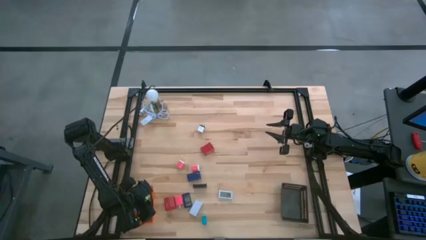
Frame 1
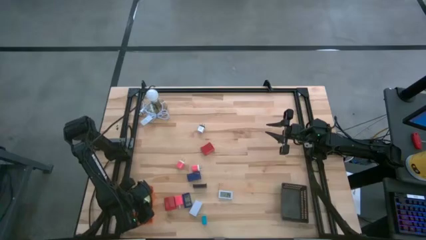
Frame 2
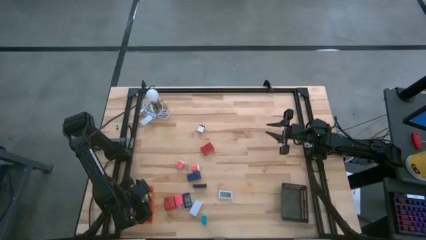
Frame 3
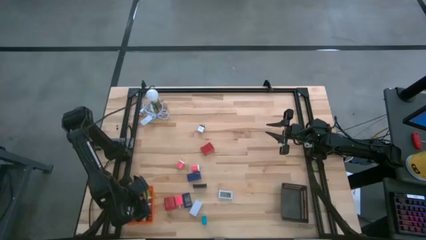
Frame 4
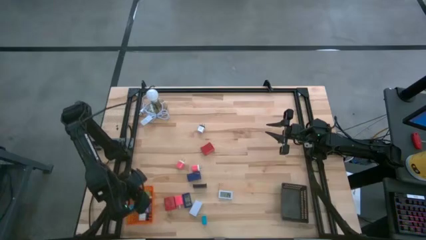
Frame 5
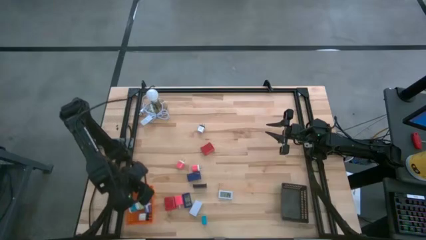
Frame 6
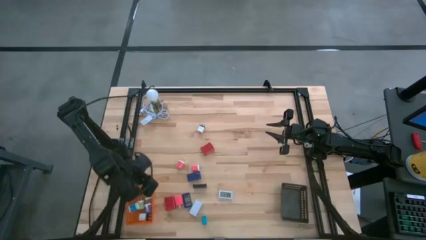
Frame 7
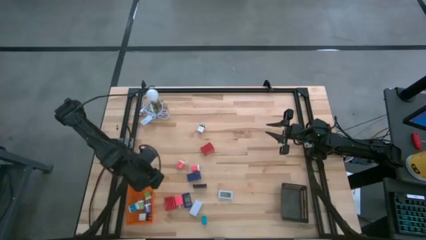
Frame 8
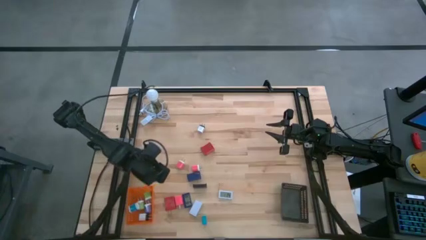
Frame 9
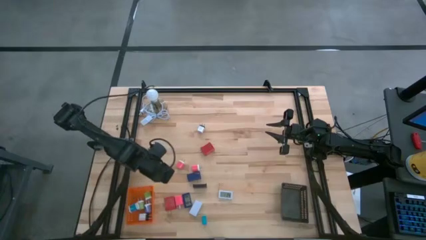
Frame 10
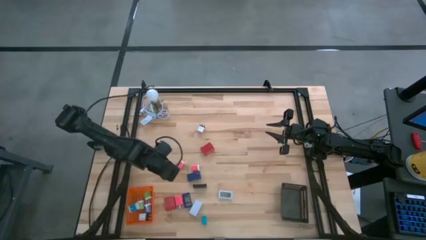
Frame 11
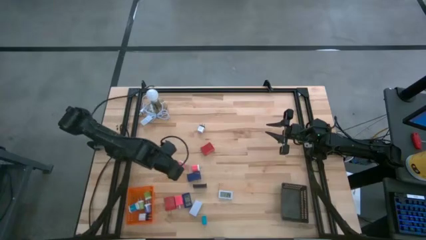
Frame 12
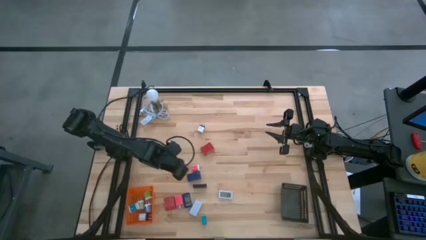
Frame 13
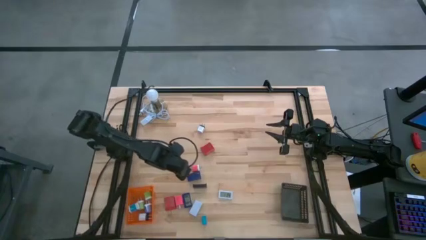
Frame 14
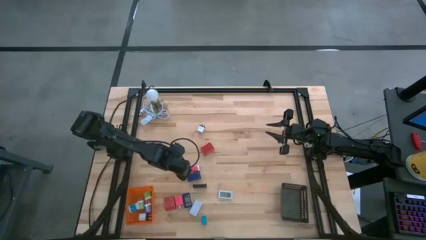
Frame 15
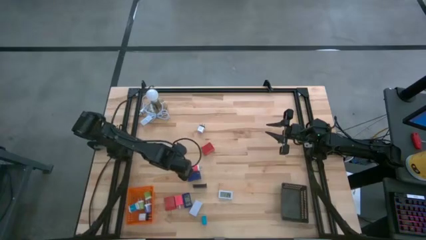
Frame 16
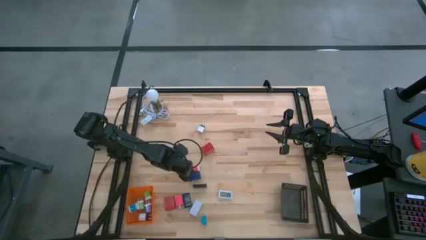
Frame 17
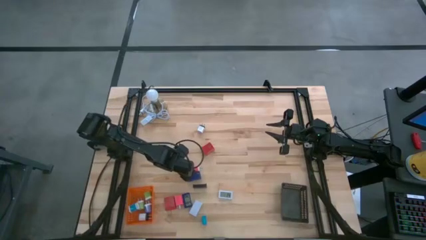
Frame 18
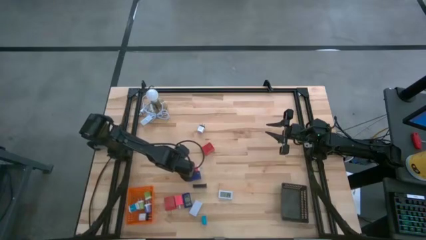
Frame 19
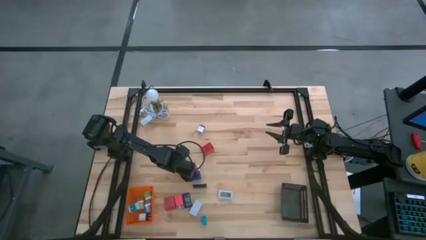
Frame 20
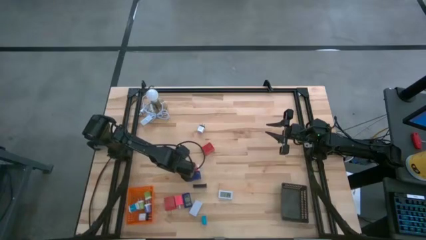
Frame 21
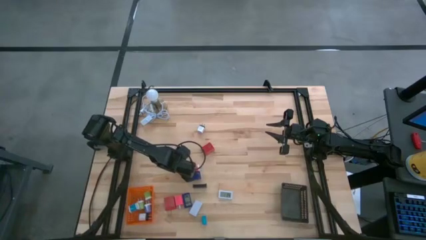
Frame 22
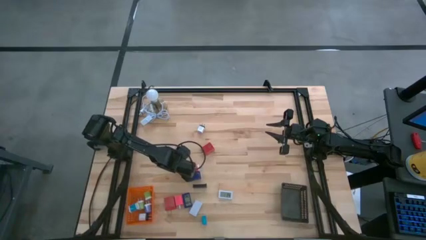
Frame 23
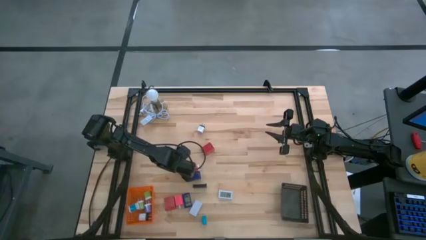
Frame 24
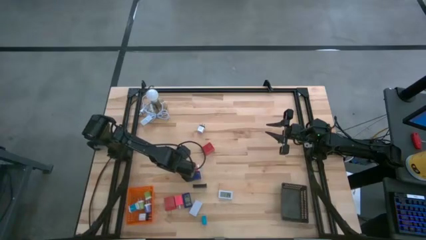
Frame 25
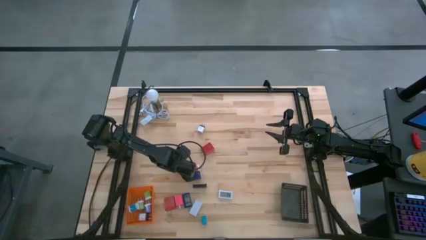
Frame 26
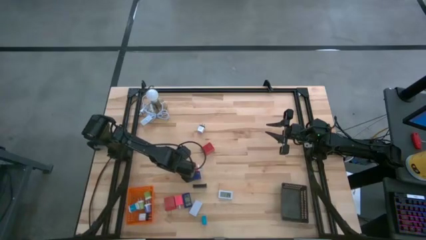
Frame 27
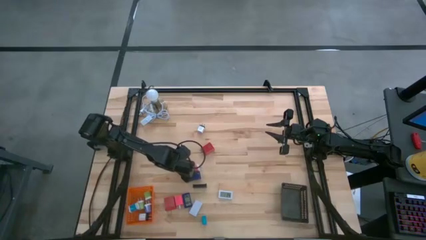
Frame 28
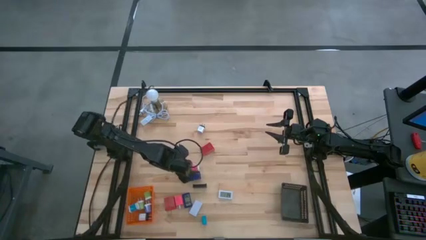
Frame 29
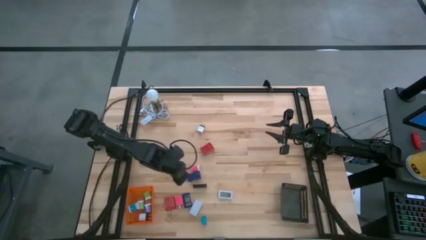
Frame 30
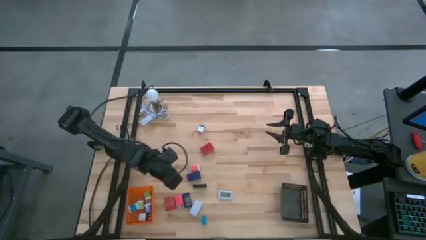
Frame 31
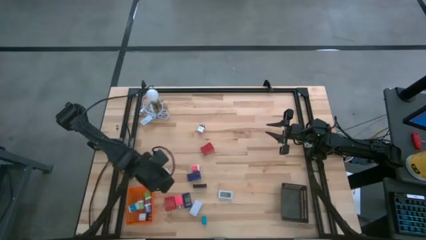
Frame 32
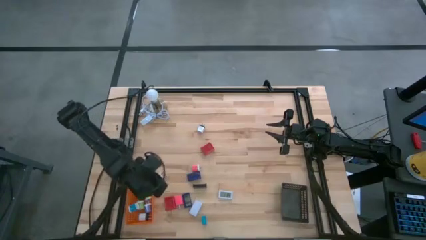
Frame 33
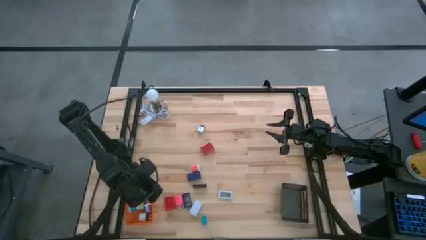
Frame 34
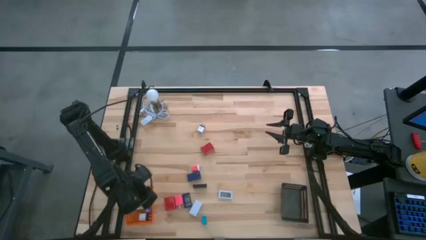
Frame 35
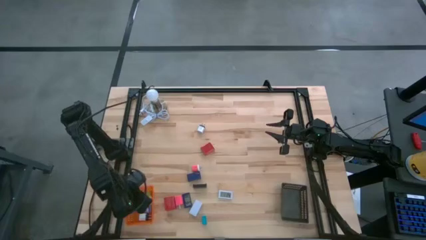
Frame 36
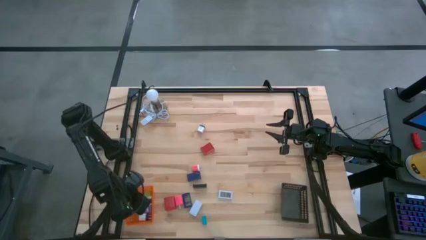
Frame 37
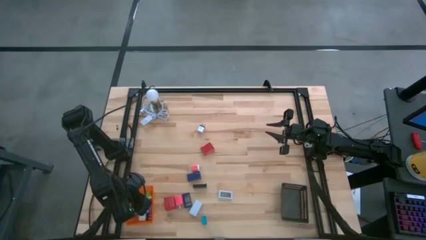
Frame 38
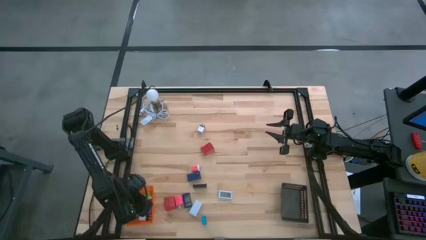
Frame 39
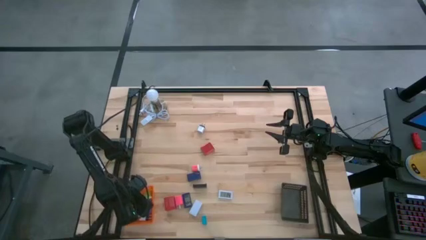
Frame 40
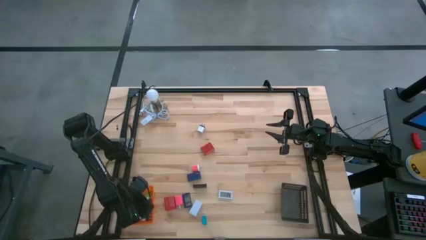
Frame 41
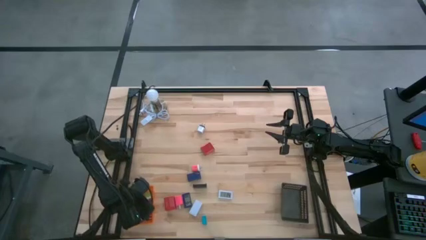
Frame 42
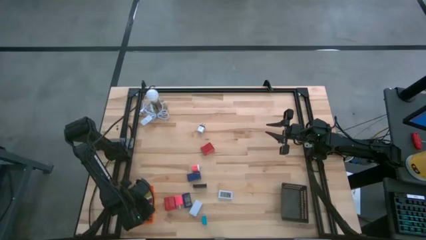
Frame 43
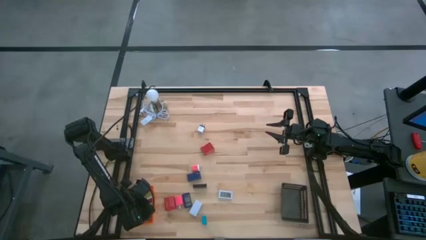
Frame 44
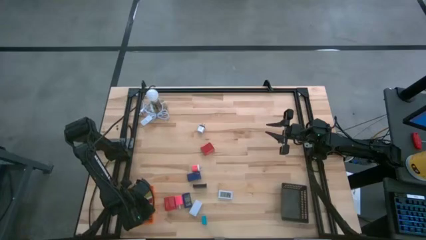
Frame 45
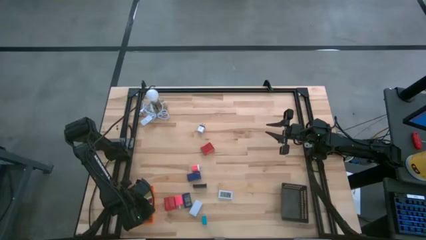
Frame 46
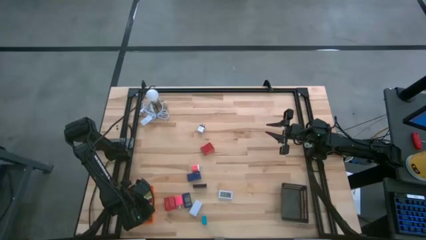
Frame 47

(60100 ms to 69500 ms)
Task: Pick & Place Office items
Put the left white pink charger adapter into the orange bin

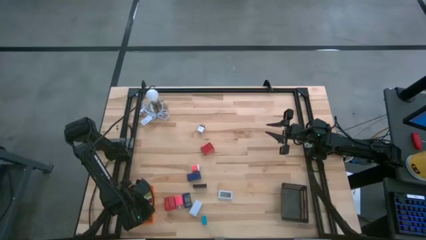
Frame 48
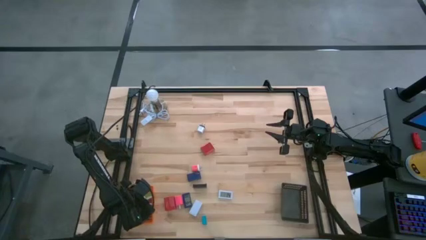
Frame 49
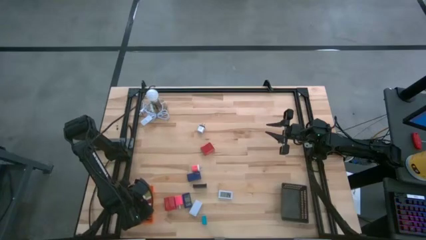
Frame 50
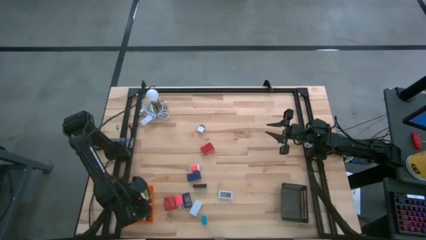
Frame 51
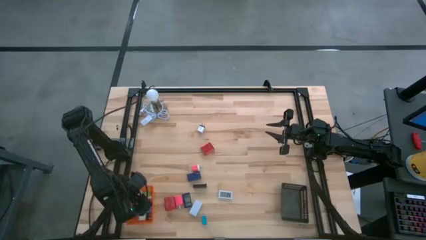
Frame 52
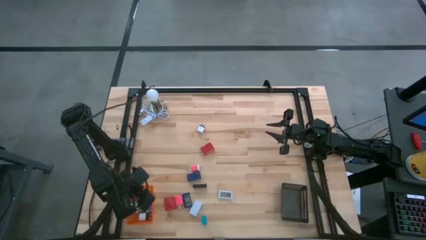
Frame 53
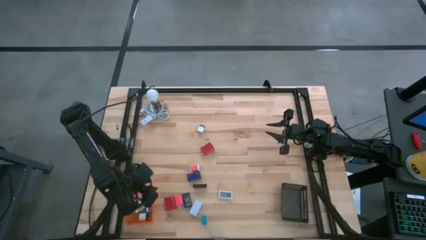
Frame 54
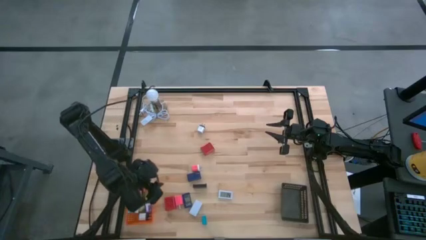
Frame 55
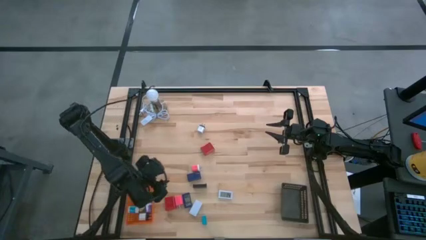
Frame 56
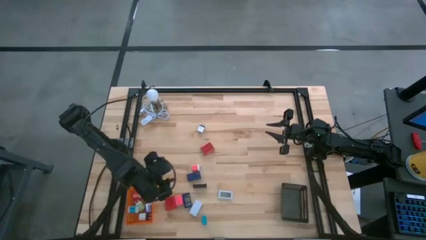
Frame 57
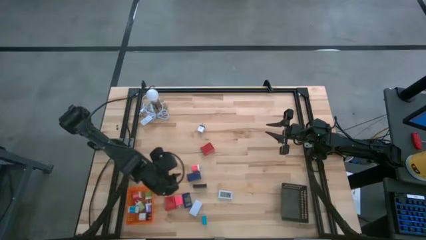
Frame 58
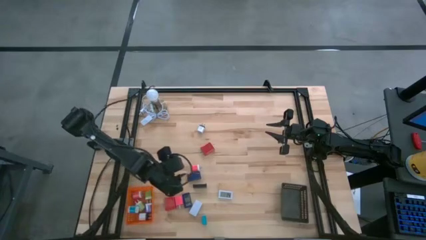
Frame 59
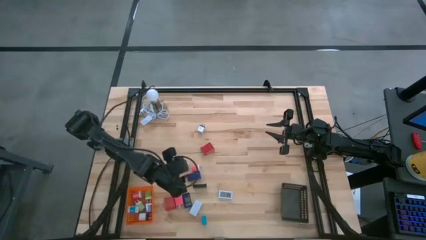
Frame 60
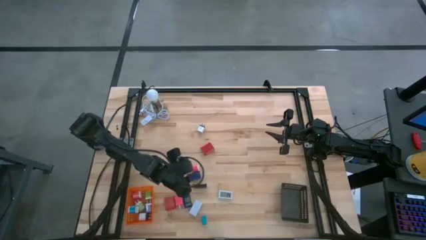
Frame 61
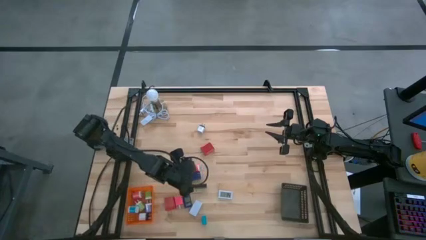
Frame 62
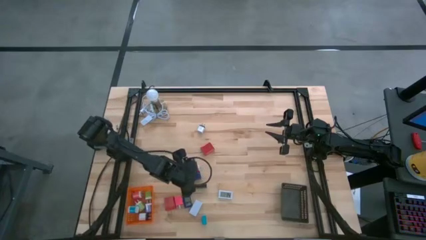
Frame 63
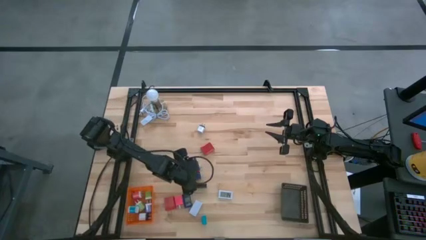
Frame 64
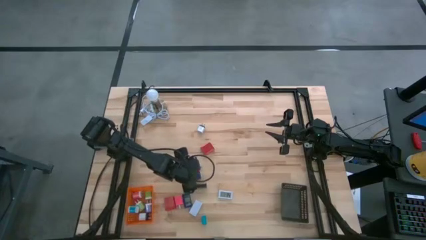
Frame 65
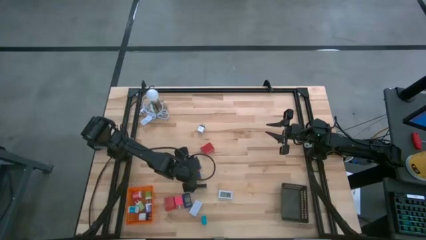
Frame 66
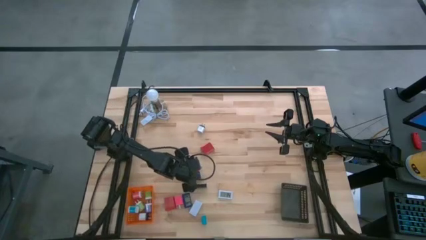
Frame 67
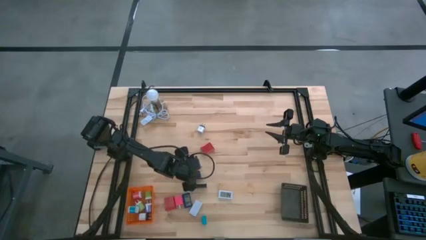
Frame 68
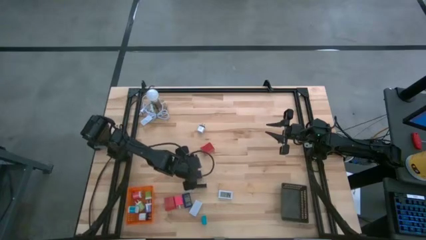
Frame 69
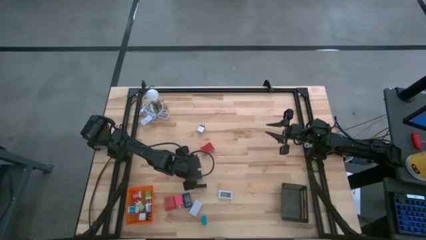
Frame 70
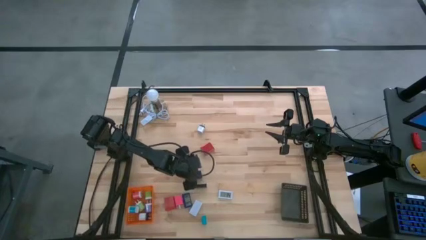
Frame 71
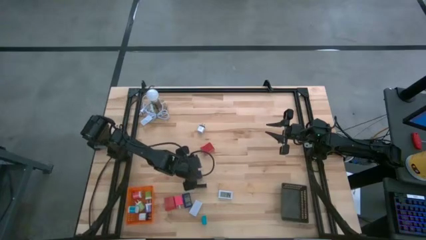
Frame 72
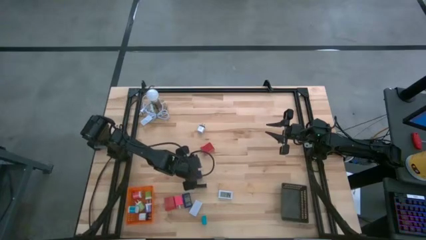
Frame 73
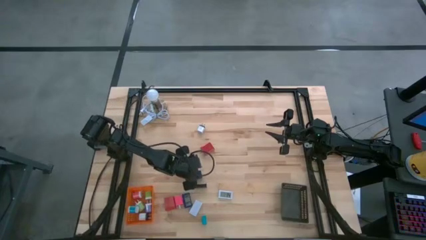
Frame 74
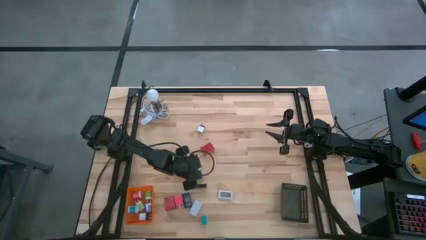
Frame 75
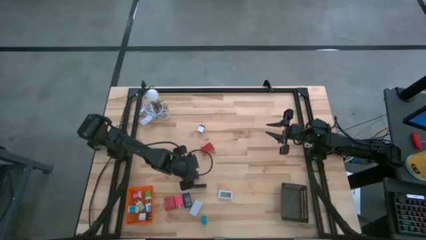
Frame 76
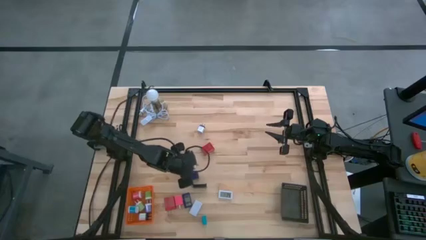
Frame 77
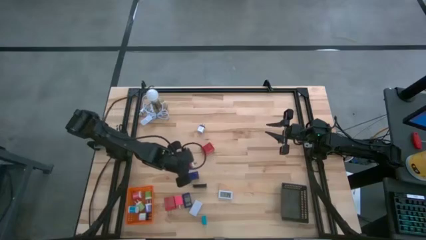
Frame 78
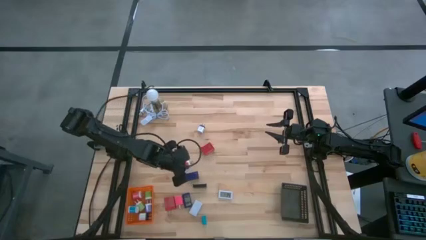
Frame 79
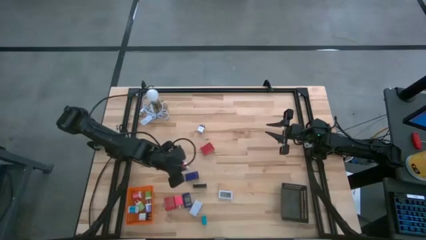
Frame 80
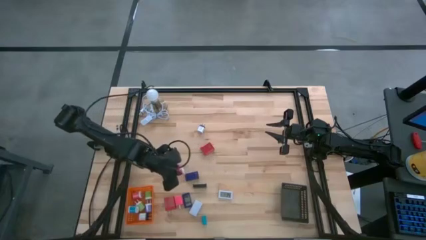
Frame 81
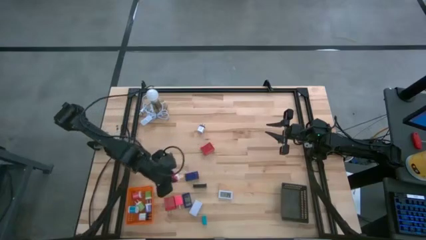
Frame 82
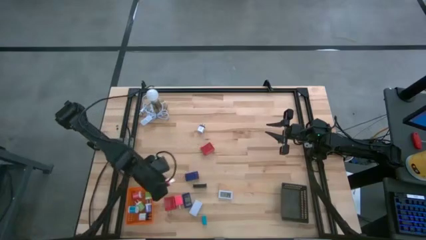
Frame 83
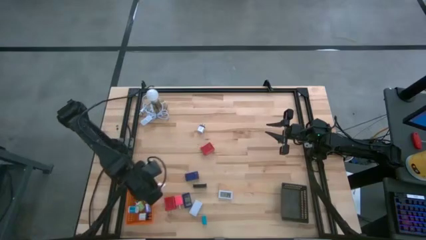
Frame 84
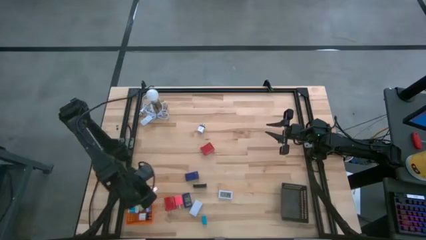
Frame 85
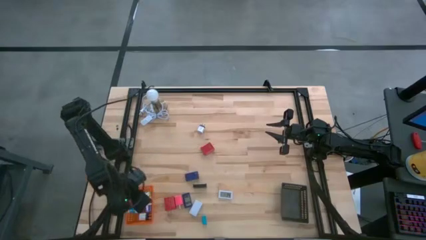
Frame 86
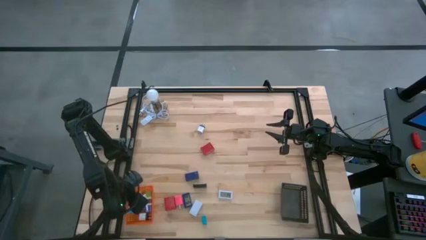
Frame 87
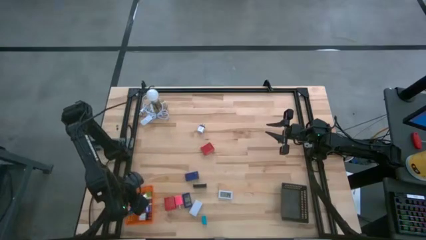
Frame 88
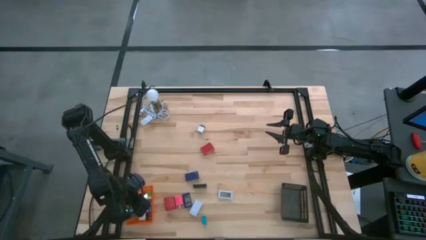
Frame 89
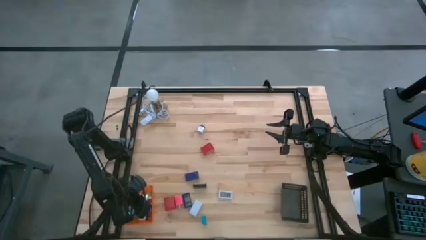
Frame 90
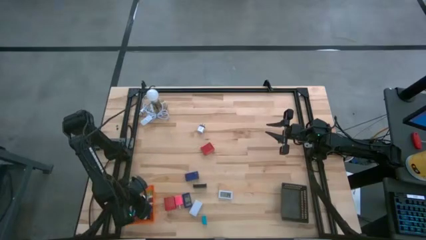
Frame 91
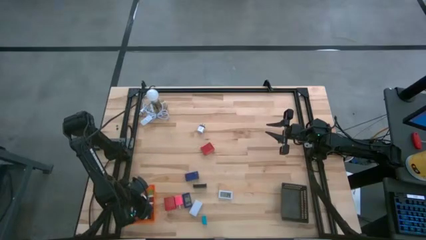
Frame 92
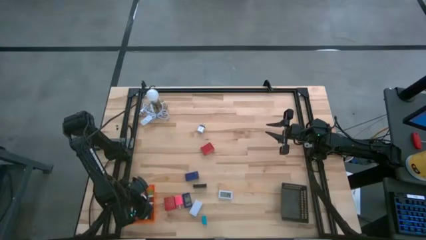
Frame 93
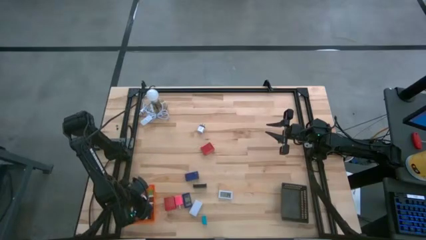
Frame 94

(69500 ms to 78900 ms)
Put the white pink charger adapter into the orange bin
